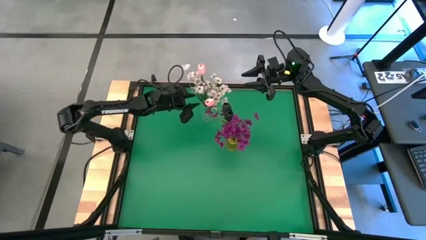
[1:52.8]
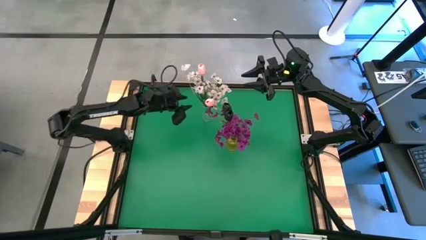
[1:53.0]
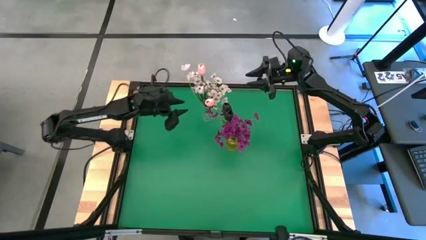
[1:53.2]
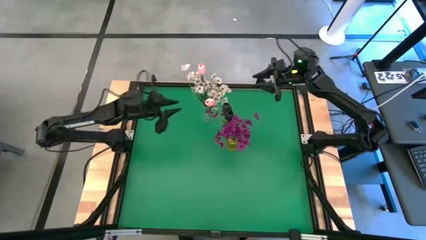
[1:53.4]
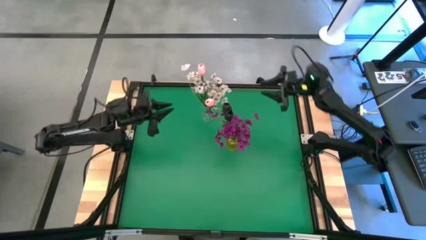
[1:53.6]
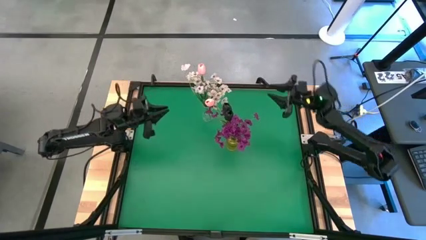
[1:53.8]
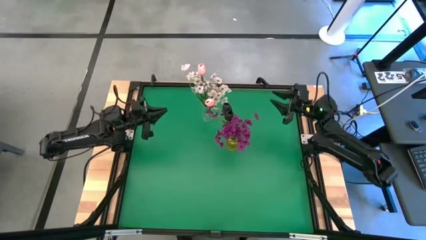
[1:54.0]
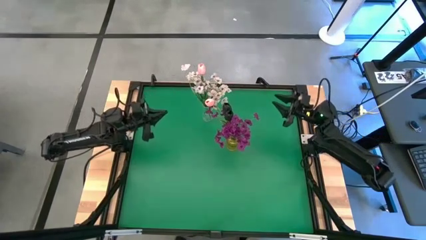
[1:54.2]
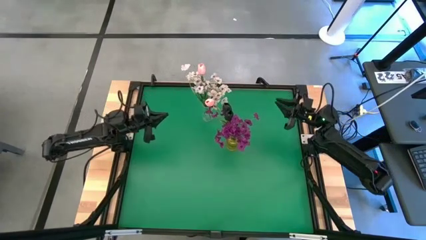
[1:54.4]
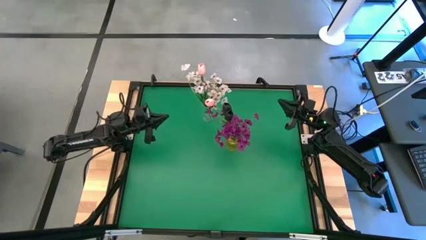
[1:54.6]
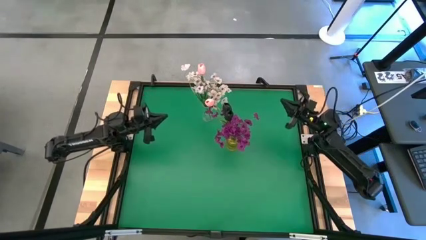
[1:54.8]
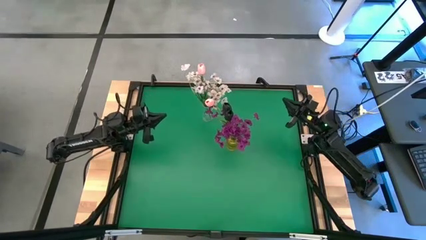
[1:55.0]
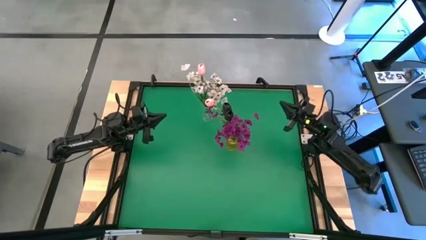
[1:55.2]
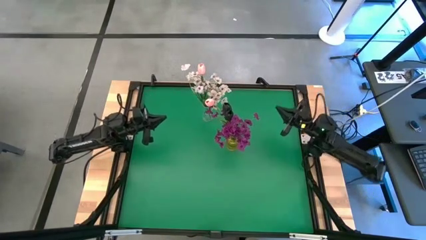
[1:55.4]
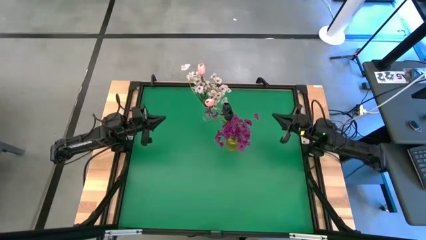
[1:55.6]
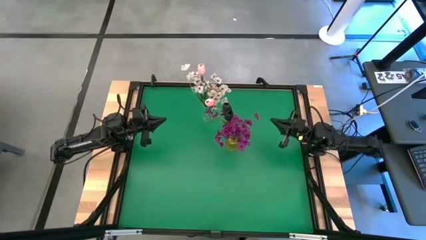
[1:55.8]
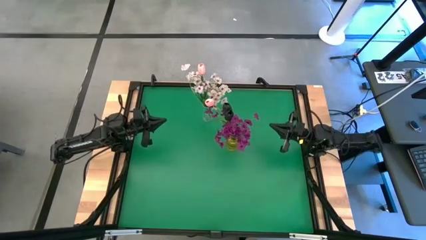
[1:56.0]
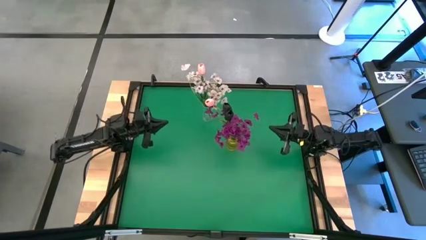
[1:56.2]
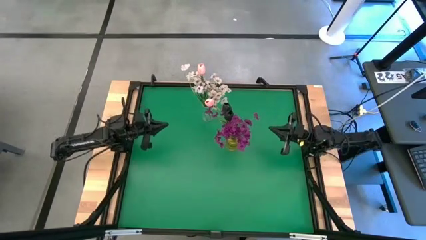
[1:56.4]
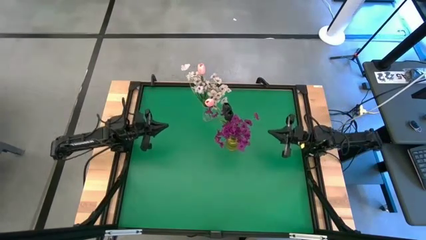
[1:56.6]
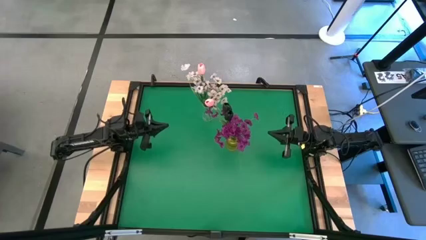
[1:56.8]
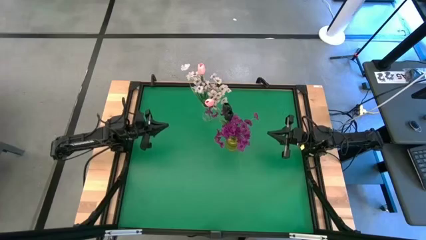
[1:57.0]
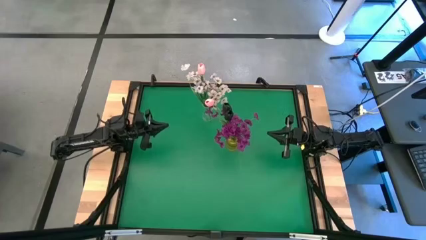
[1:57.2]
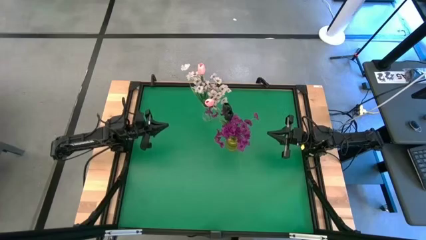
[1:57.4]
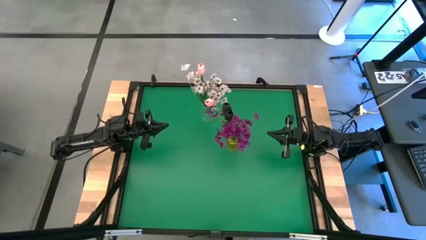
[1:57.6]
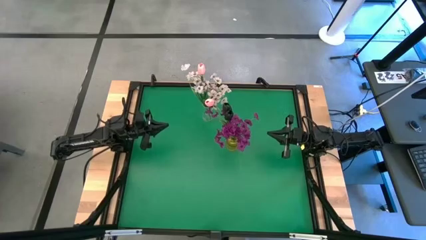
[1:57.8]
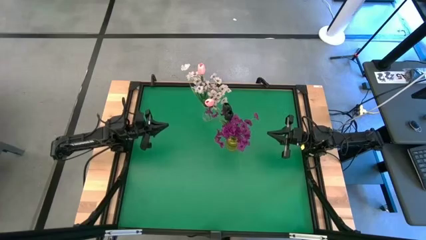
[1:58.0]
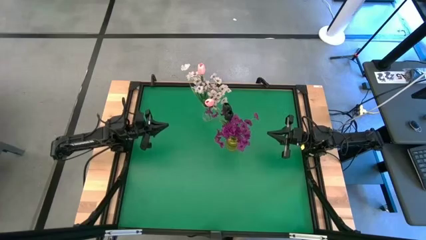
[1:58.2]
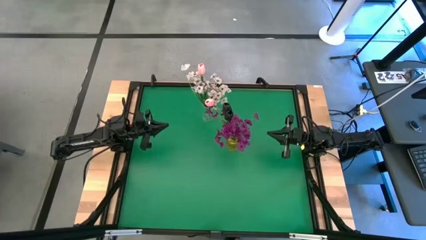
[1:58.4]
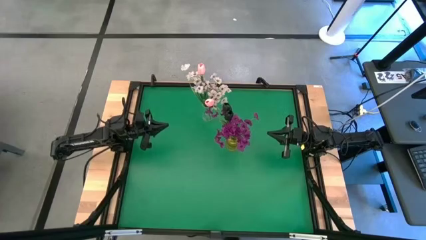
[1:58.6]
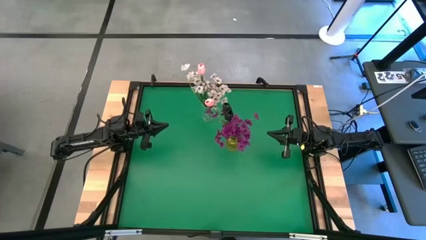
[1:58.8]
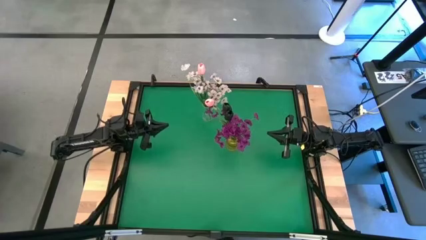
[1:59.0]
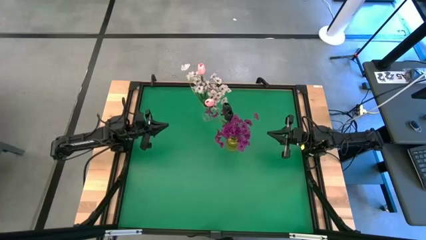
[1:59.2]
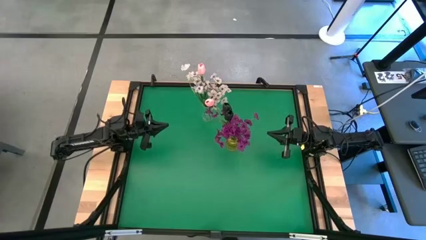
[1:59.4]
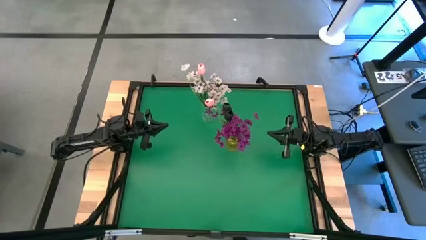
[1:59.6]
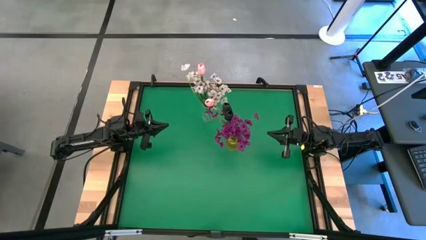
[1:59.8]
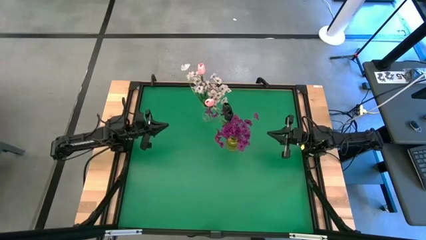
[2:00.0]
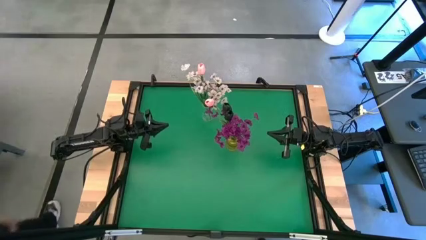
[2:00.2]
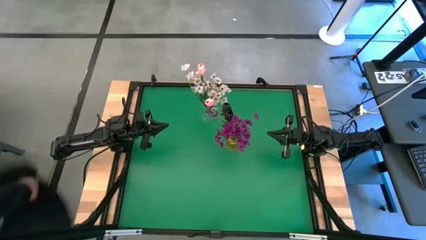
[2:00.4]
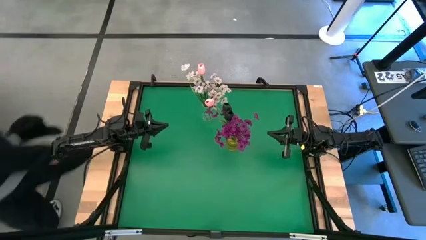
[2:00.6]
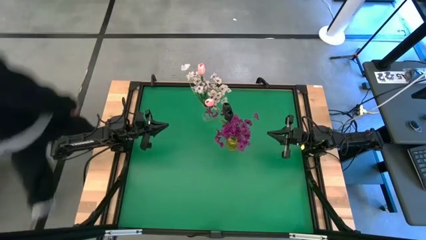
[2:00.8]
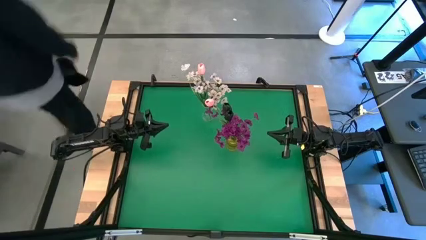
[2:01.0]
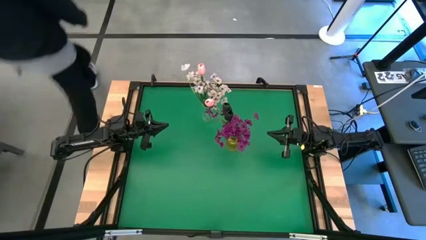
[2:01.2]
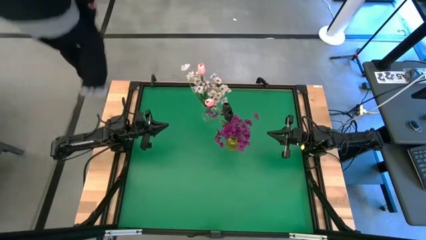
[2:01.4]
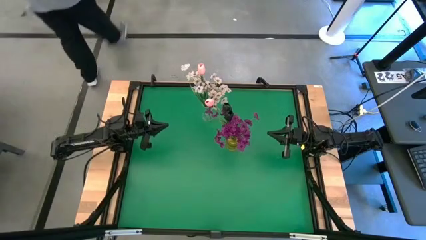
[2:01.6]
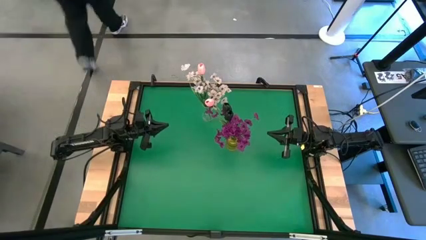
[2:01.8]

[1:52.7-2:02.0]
Task: Sort flowers into vase by color
Return to Home Position

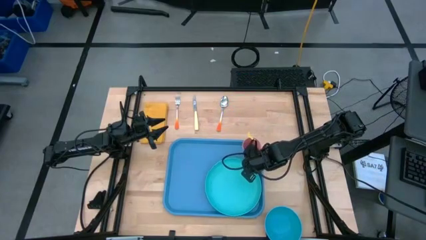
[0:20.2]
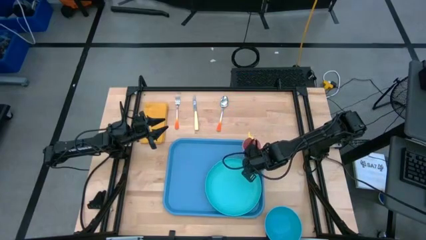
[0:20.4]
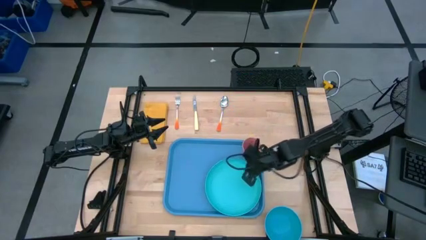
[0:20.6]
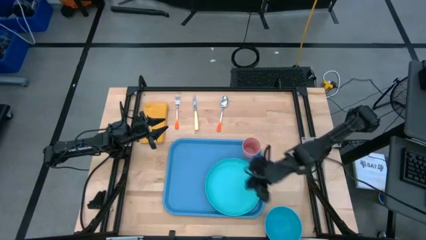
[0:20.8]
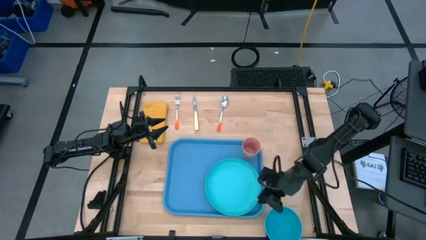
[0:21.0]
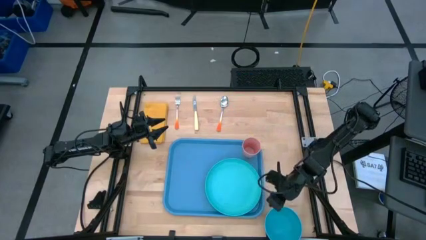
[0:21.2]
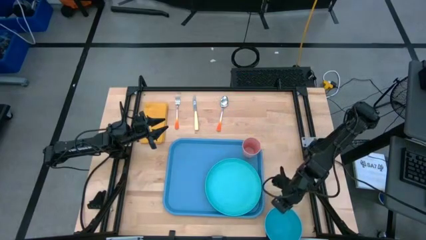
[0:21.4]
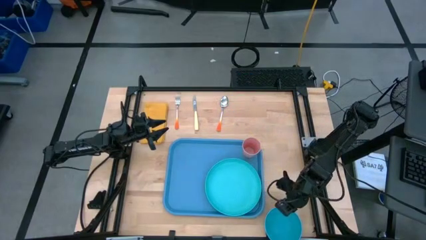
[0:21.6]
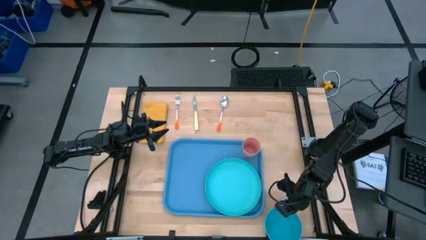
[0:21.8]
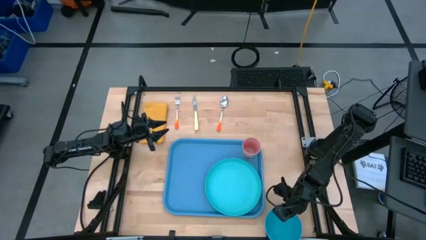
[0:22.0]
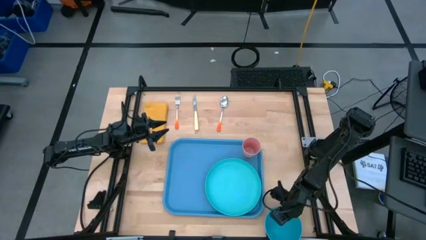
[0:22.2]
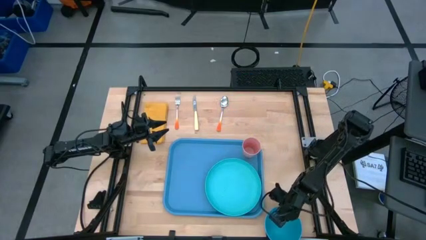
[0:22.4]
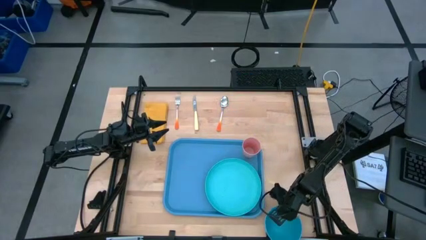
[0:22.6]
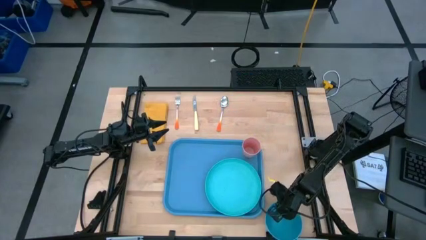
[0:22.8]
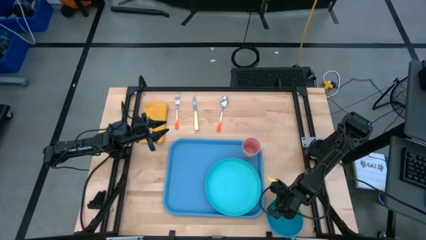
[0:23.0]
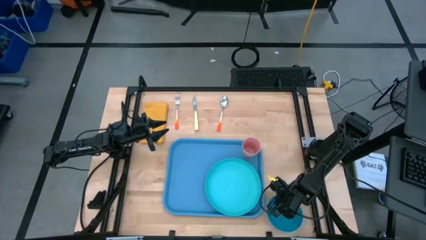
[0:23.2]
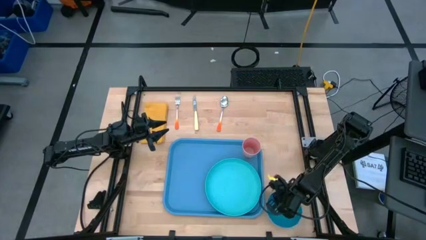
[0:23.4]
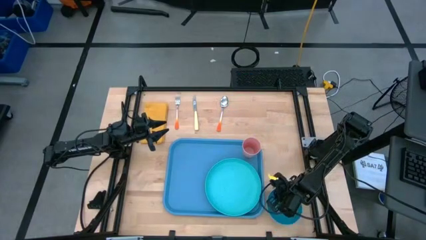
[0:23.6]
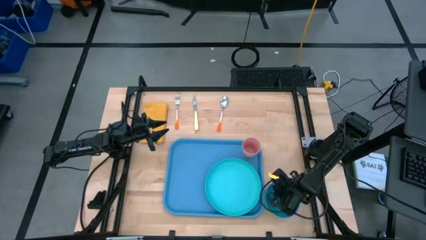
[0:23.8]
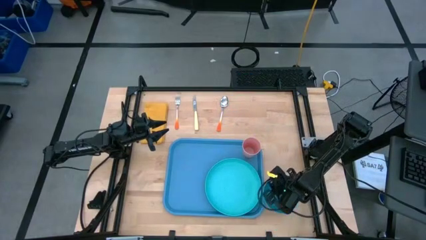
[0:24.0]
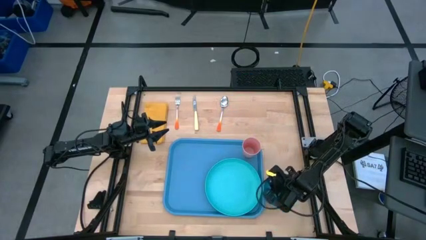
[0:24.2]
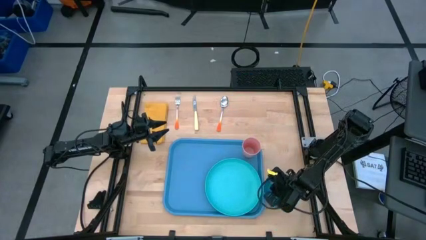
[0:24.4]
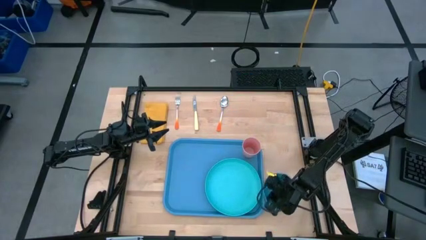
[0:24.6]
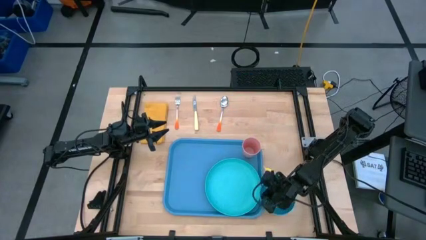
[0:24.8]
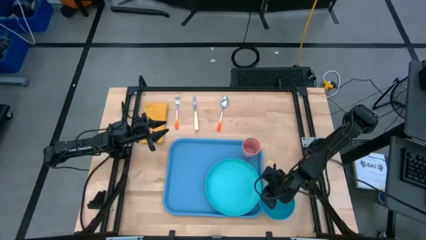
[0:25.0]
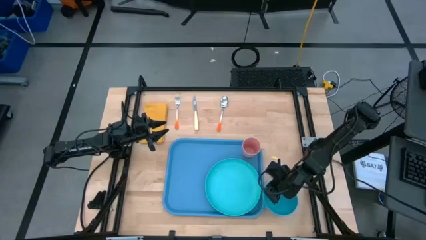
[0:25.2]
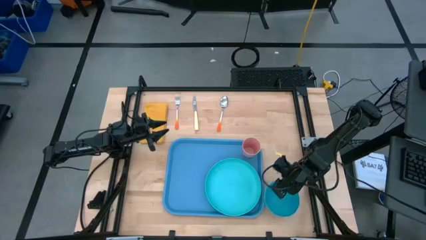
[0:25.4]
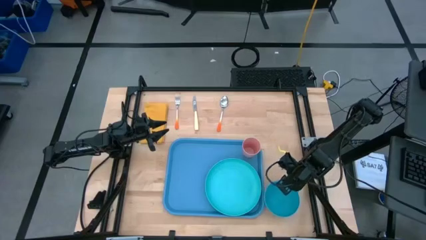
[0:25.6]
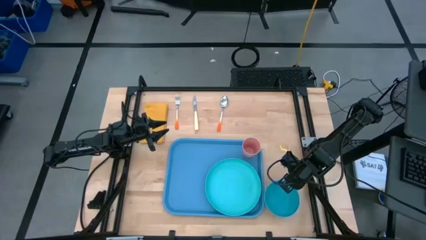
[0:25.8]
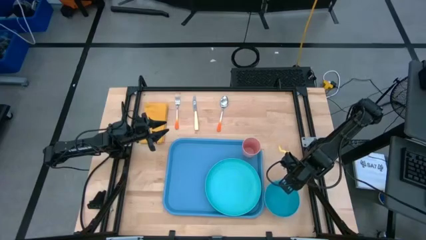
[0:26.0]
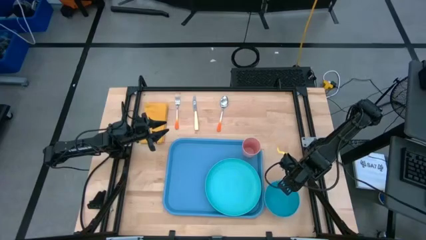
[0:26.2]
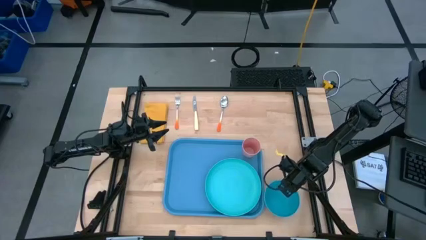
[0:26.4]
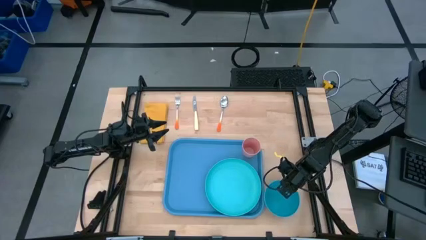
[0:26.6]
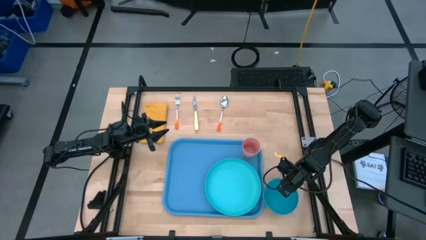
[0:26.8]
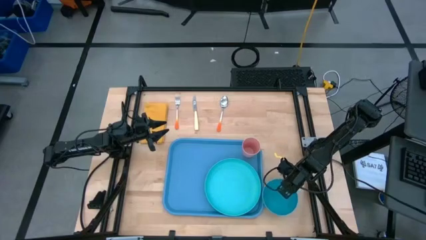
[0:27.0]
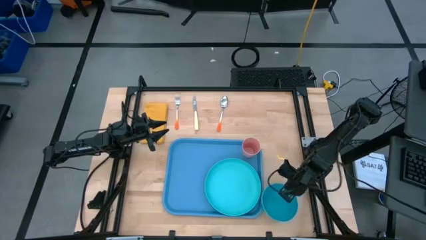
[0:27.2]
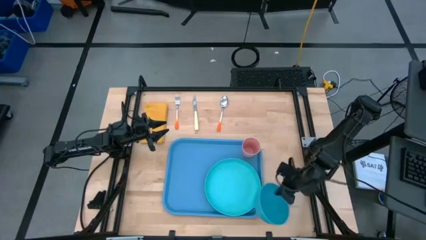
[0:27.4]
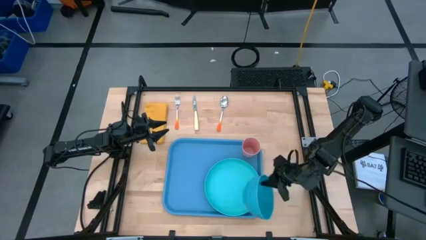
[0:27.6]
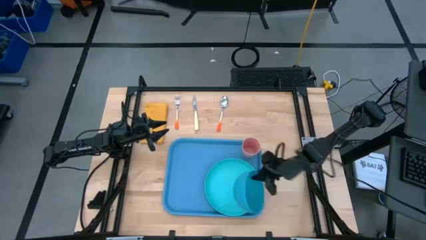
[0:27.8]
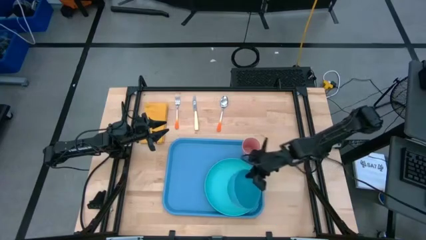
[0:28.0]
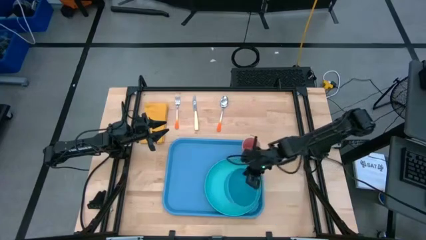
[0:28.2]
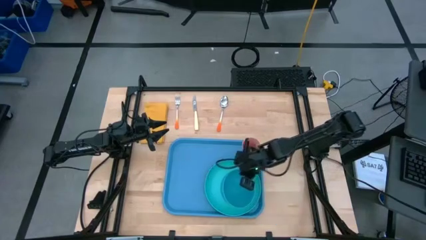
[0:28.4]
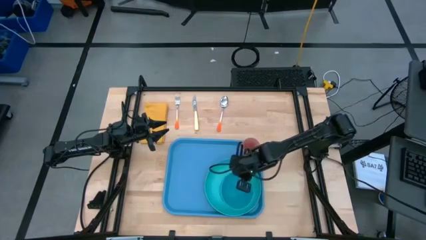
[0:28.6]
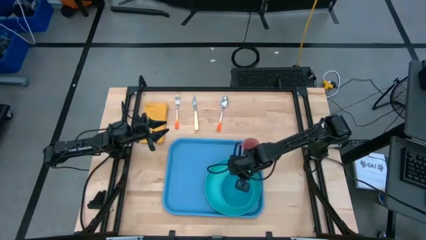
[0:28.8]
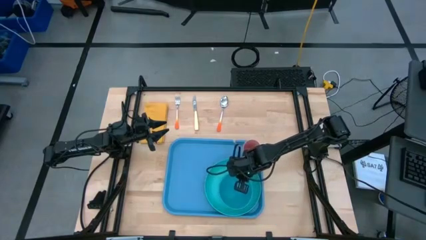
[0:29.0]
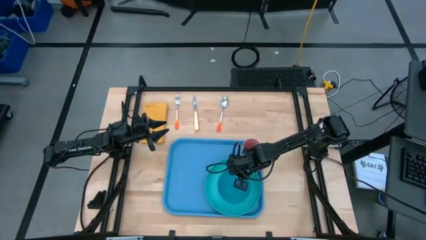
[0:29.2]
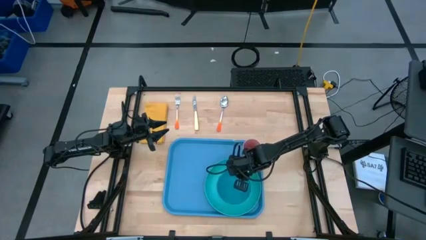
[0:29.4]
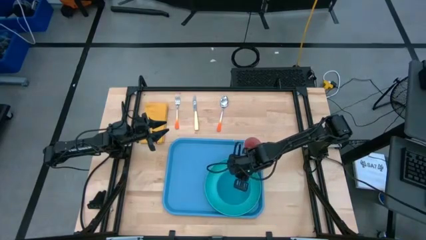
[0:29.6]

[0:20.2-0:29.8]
Task: Set up tray
Put the blue bowl on the blue plate
